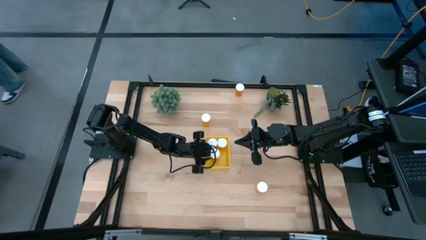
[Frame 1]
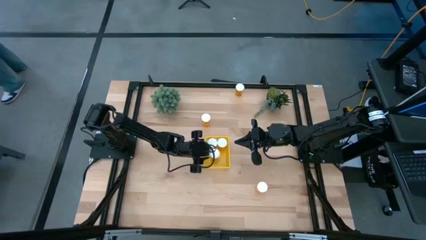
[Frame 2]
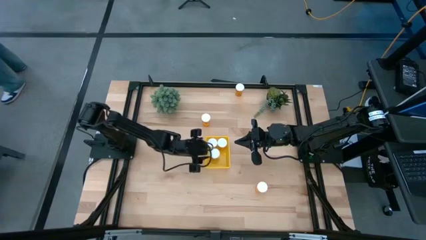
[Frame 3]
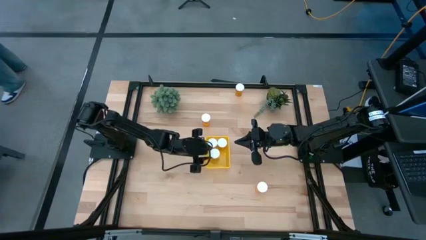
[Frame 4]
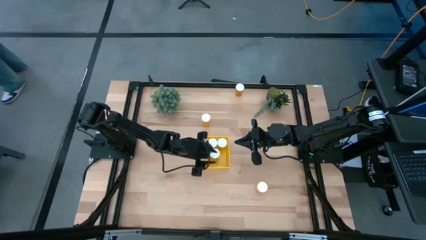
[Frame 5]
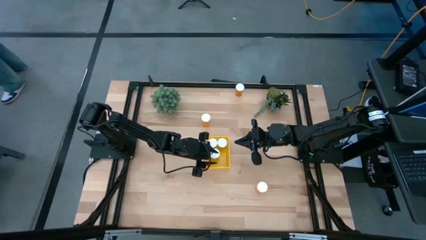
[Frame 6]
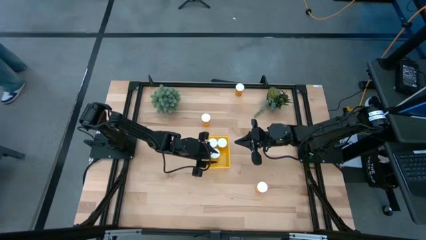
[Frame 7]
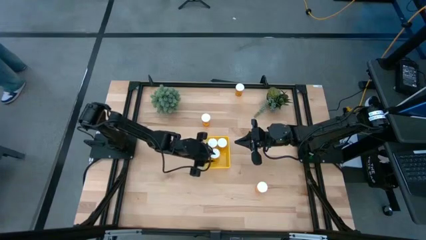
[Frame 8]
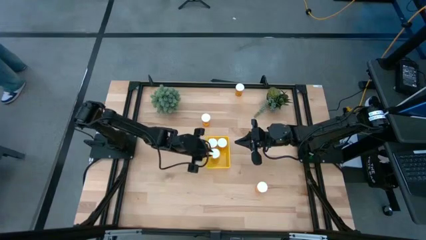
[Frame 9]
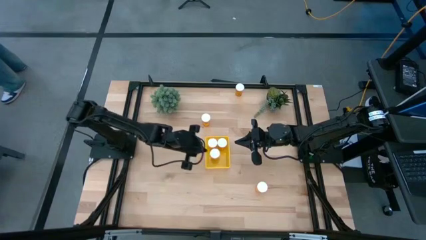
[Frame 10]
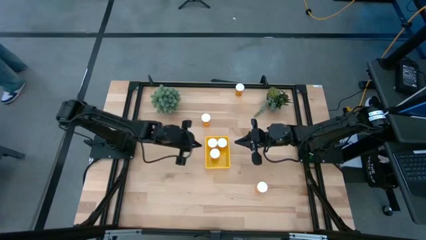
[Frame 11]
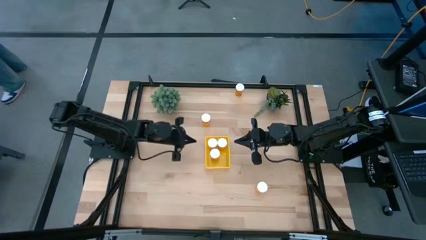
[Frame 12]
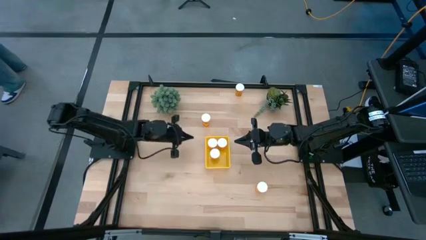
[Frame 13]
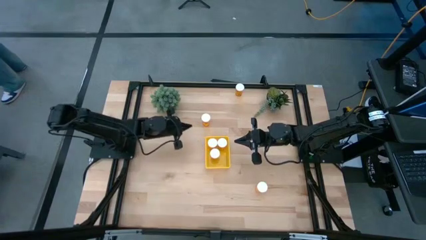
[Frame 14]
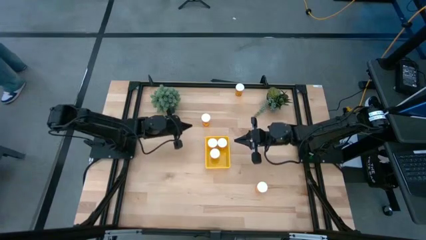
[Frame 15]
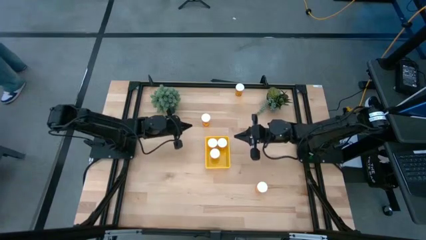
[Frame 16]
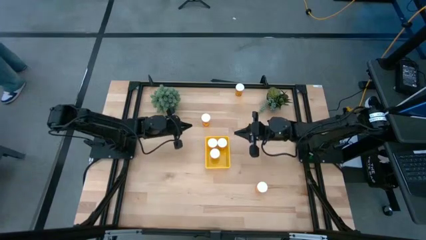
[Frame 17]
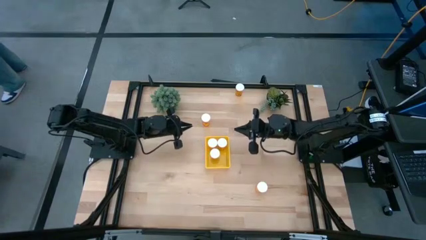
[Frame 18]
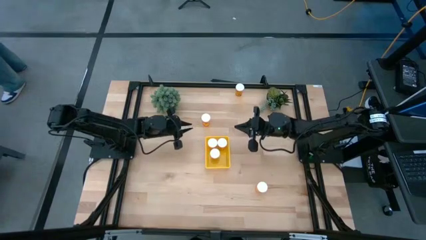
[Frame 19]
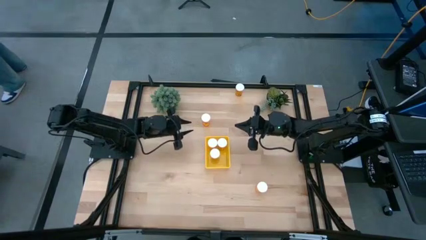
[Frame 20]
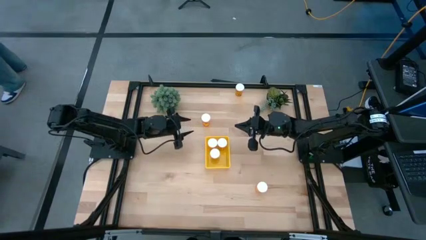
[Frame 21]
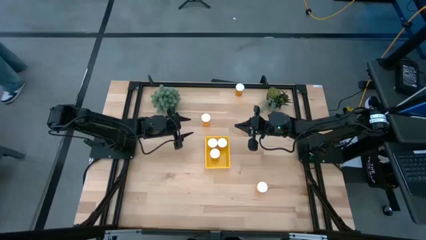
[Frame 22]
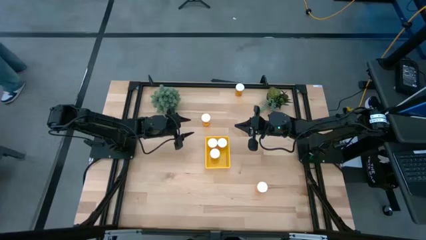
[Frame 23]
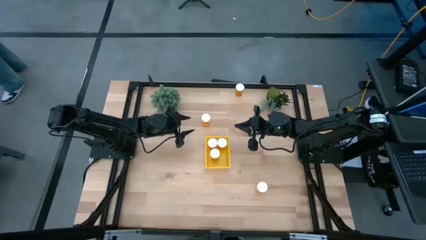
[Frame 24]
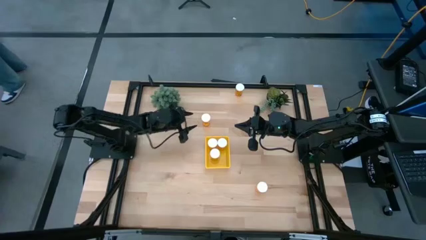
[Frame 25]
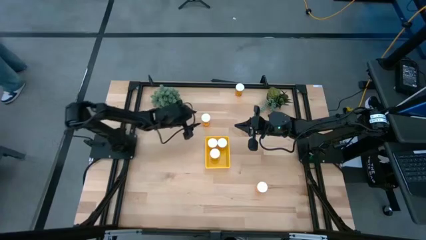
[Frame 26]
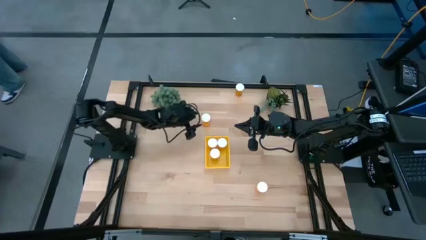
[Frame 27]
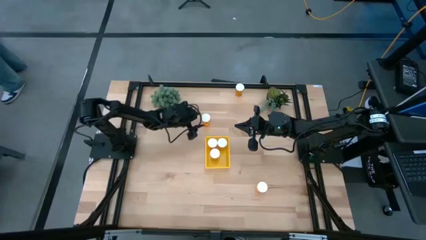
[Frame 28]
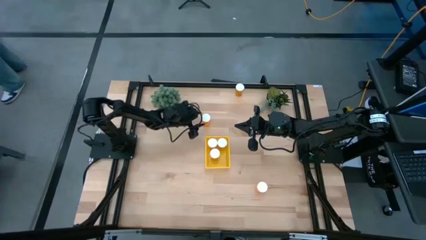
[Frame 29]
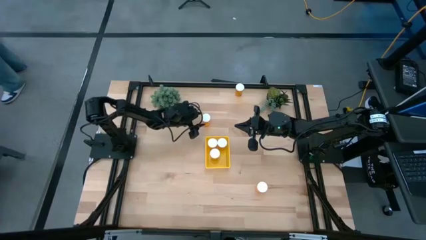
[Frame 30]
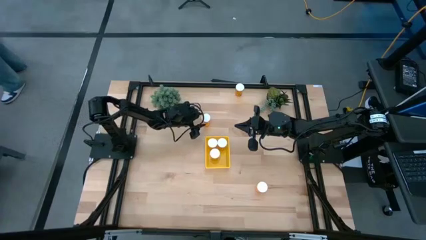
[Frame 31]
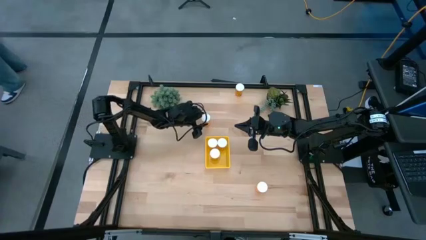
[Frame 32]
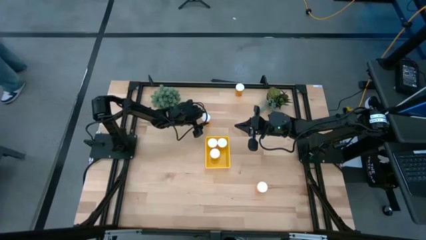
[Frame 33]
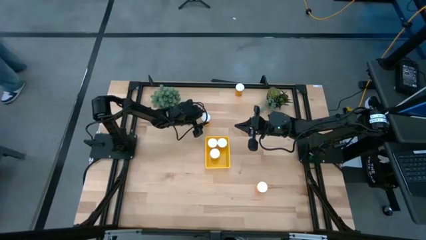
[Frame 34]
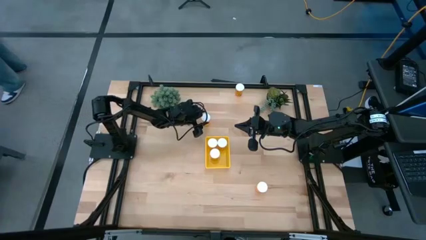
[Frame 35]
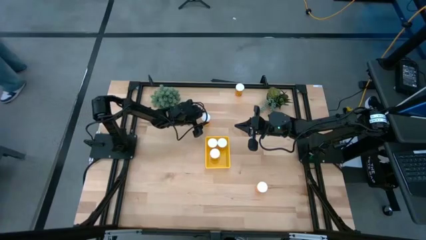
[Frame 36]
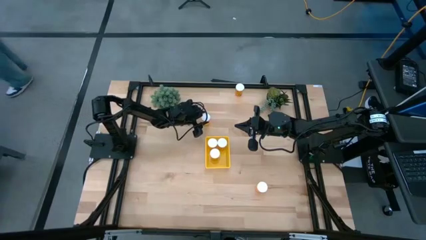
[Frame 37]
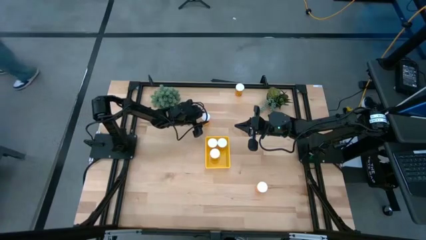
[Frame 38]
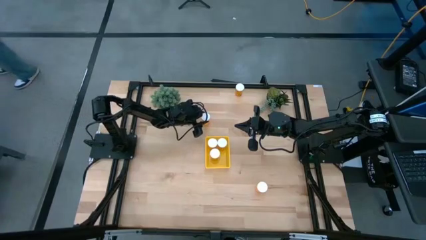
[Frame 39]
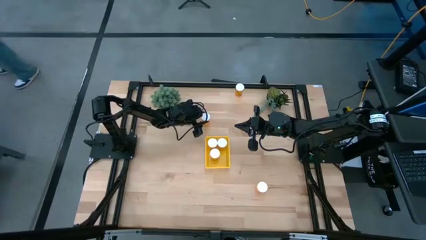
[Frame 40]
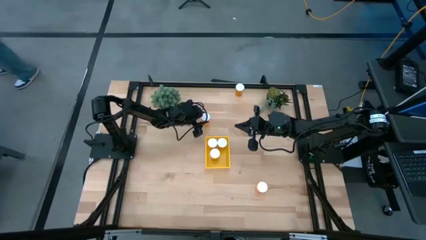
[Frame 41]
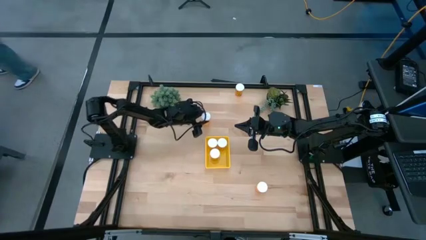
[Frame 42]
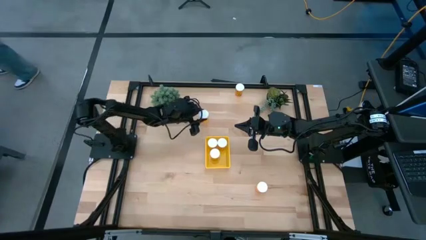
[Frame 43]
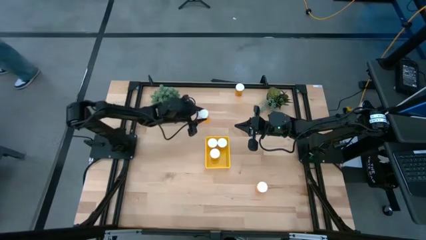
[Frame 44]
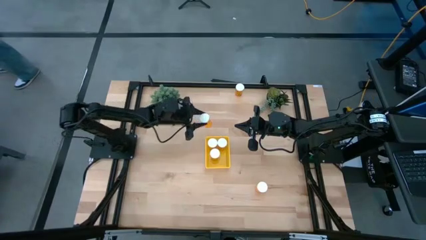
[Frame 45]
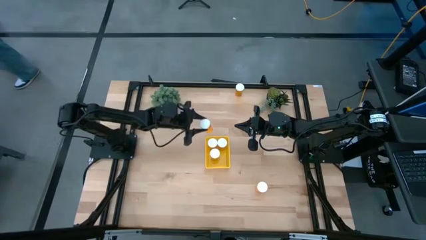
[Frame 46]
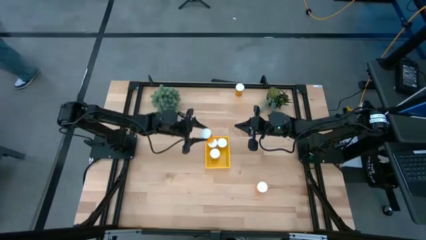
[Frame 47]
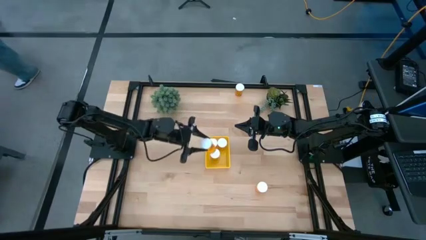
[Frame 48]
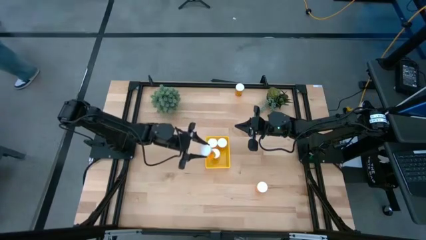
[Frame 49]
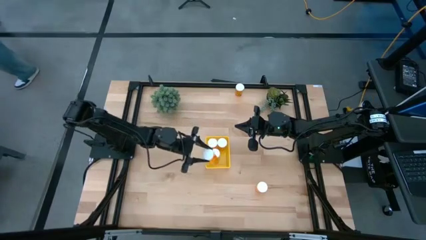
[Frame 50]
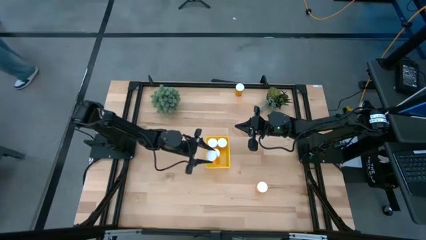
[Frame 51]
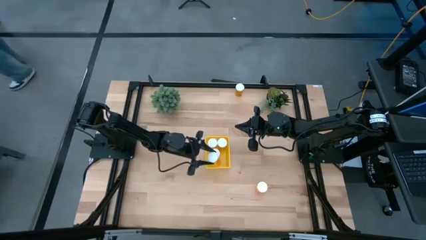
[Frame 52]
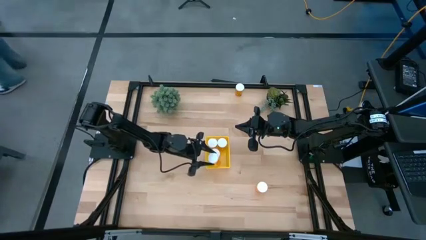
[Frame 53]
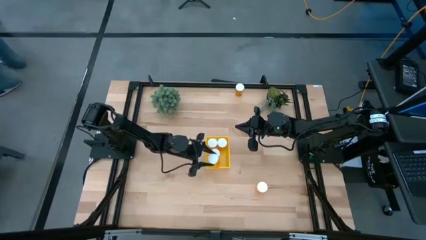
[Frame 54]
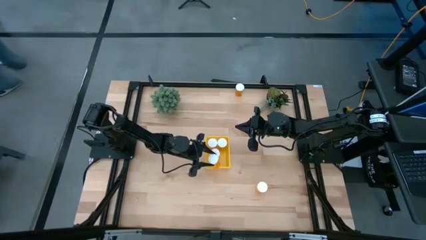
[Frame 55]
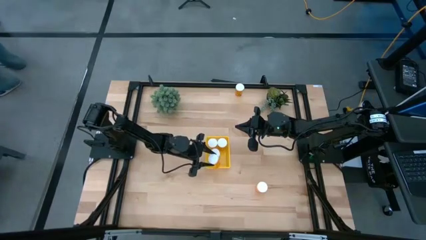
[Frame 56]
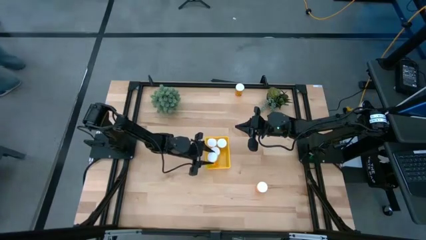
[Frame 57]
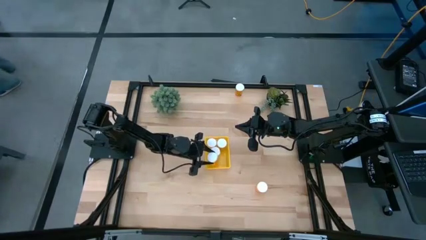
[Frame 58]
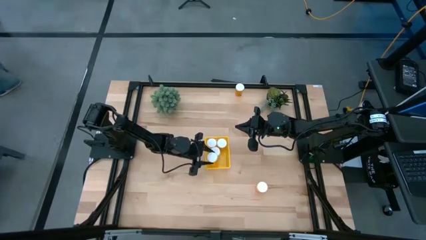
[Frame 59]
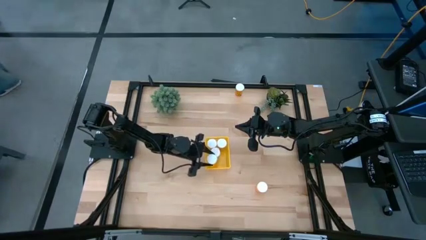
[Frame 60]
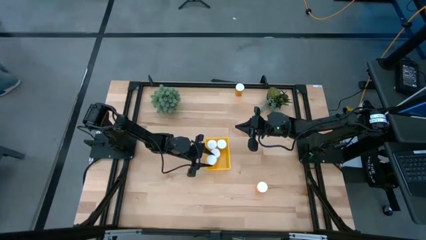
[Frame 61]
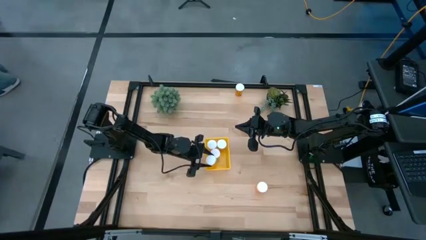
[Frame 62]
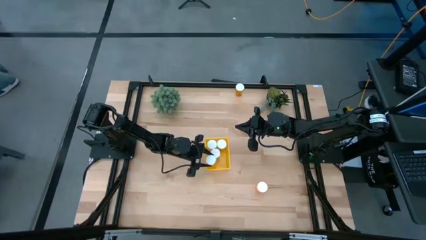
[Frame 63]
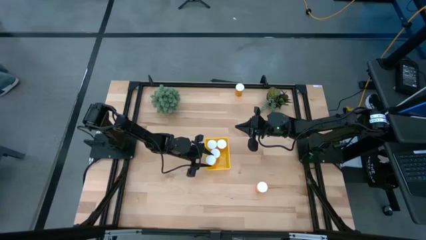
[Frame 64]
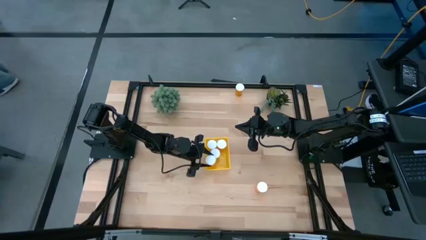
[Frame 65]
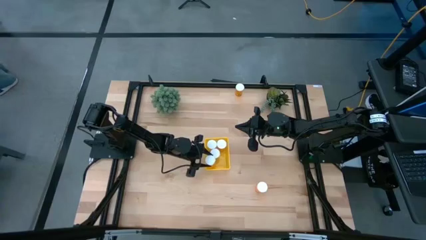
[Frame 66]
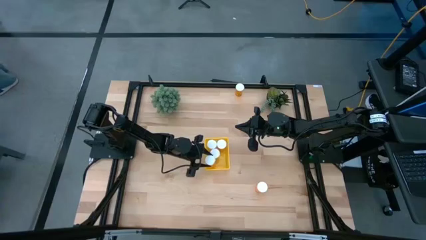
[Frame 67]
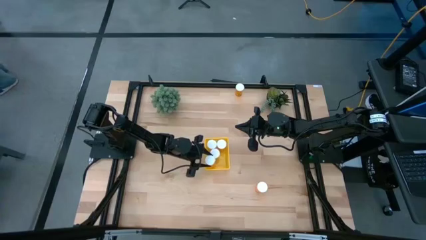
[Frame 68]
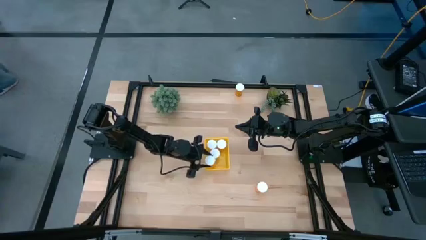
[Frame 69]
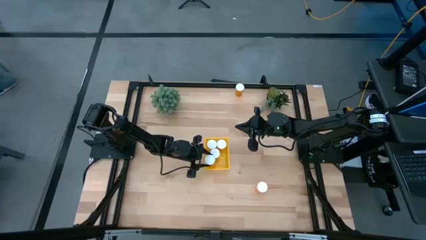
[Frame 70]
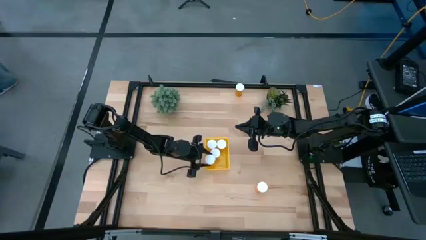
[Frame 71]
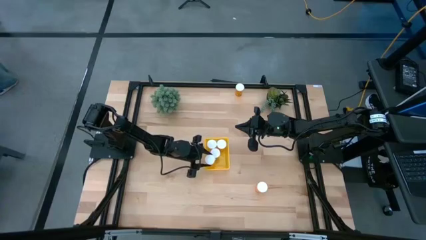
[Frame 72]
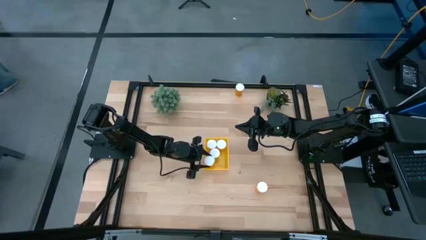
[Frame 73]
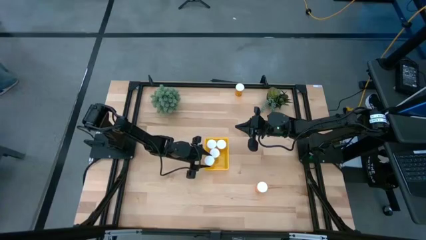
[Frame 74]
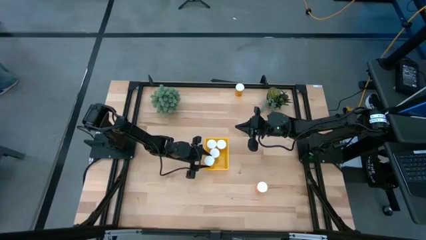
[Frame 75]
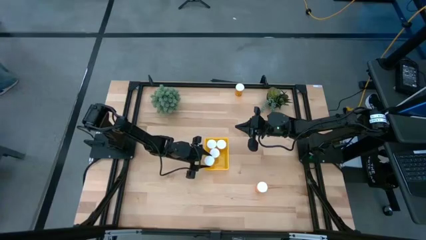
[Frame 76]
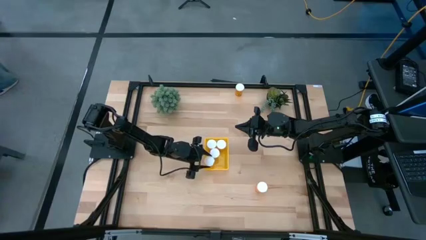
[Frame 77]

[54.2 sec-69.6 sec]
Task: Pick and place pill bottles into a basket
Put the orange pill bottle into the yellow bin
